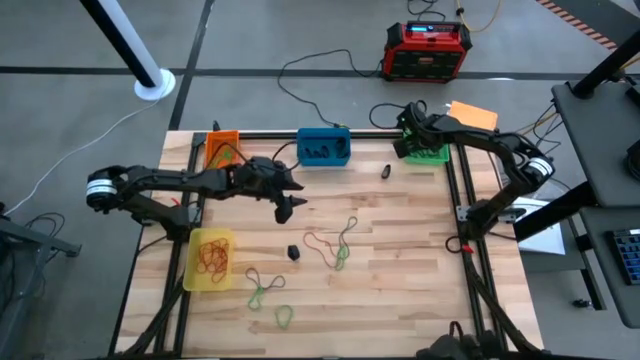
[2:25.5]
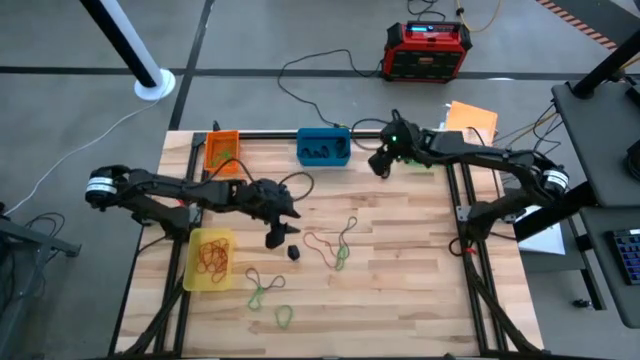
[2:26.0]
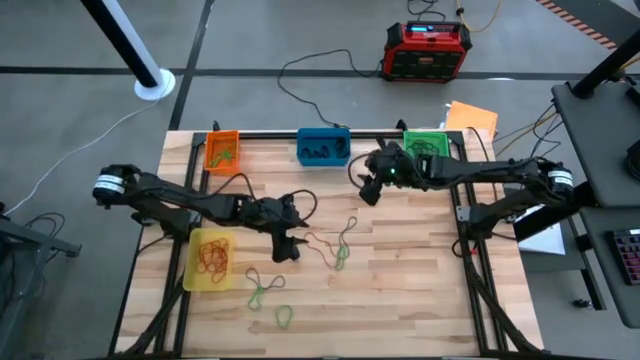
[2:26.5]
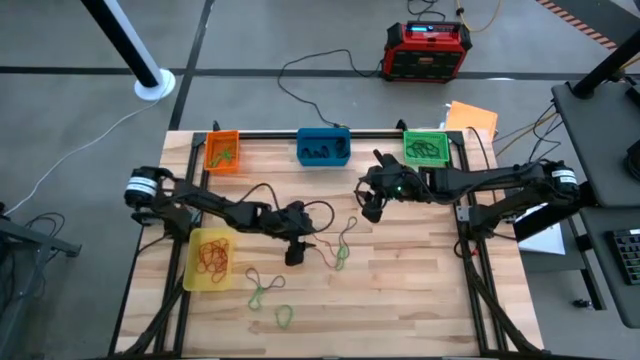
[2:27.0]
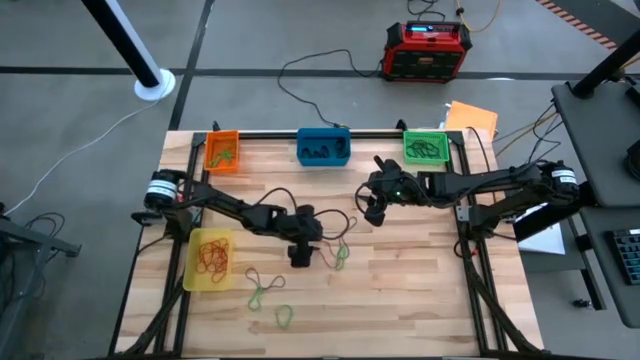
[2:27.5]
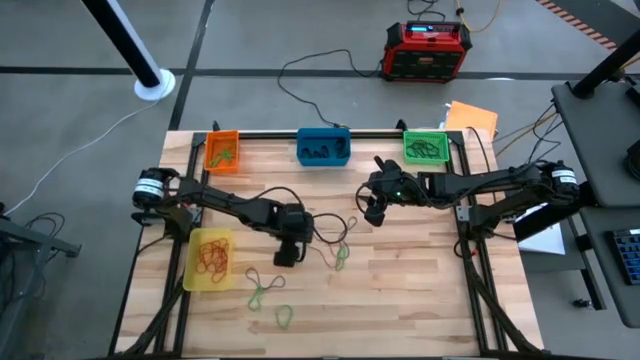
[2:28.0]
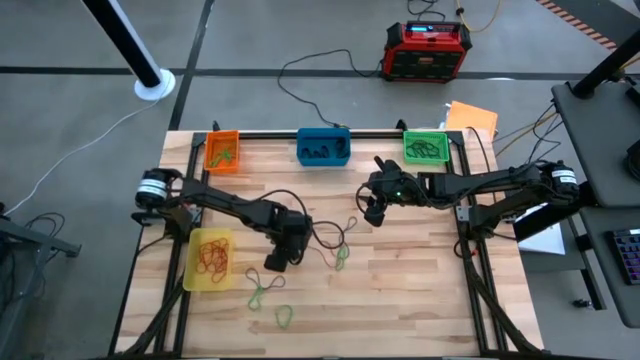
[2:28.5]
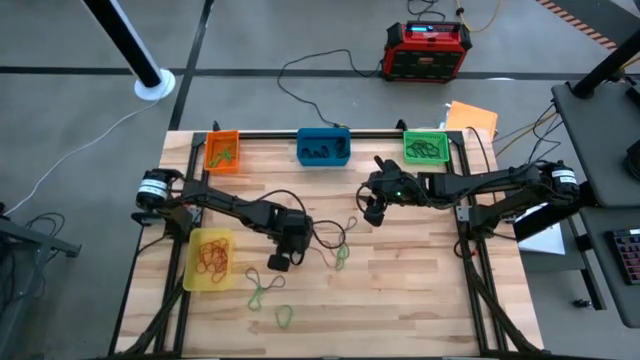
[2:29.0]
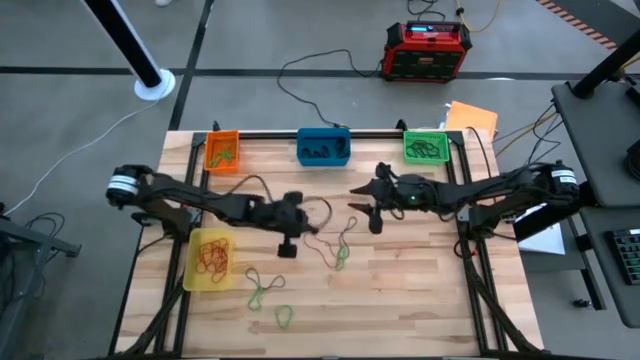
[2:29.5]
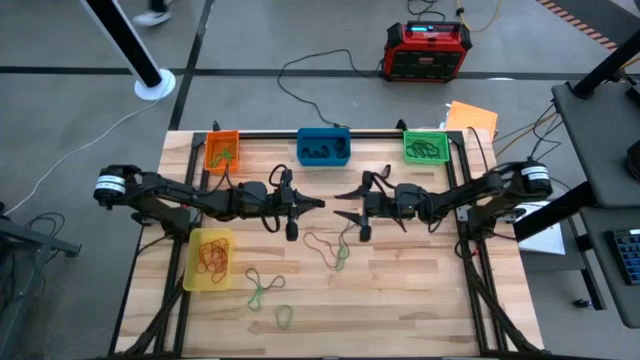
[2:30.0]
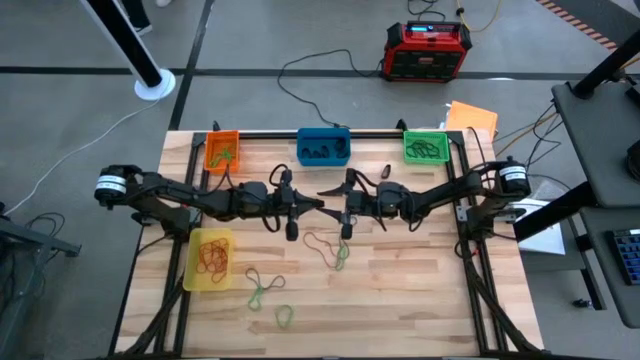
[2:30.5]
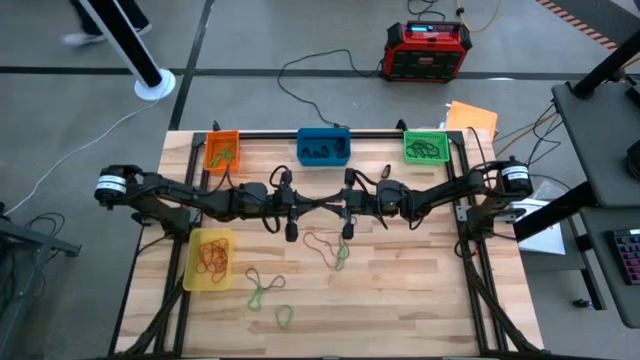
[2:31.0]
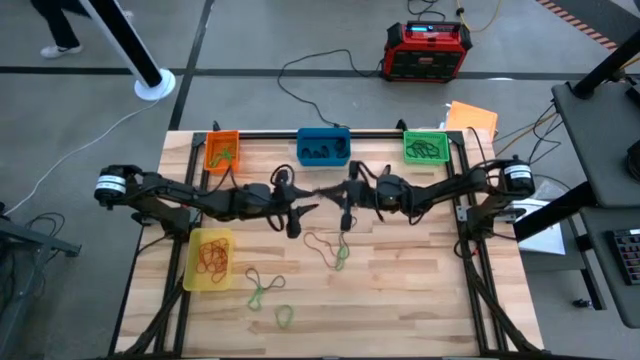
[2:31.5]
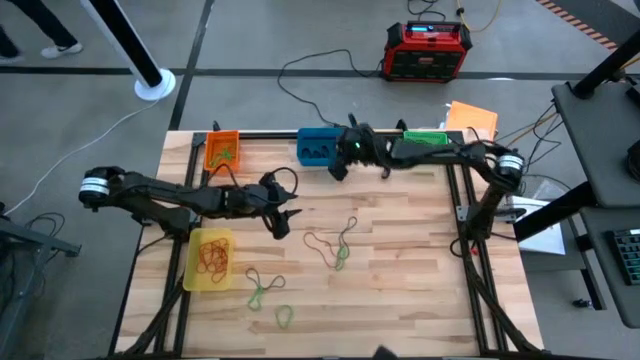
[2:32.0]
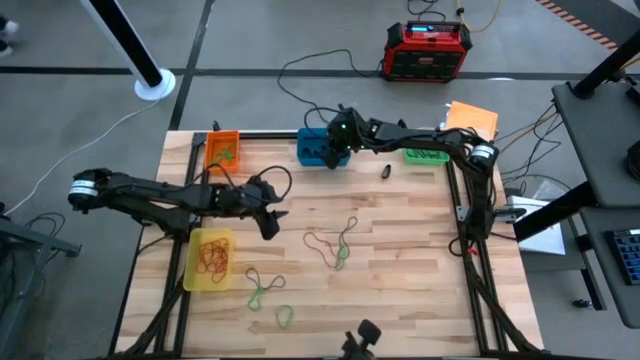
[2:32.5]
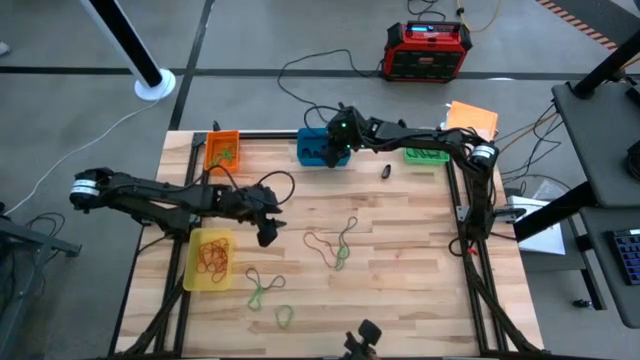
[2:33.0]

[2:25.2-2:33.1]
Task: Sort rubber bands into baskets
Put the bottom black rubber band into the blue bin

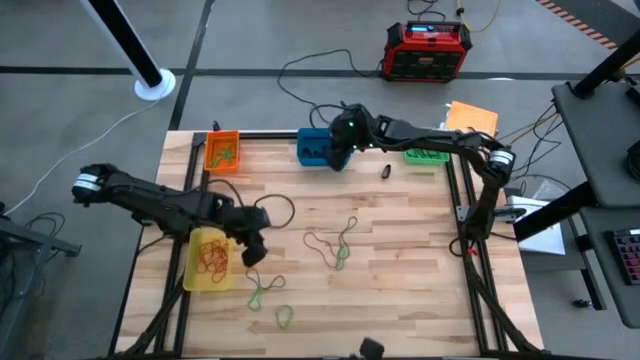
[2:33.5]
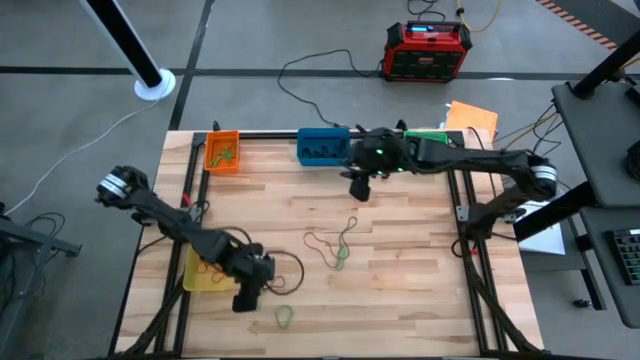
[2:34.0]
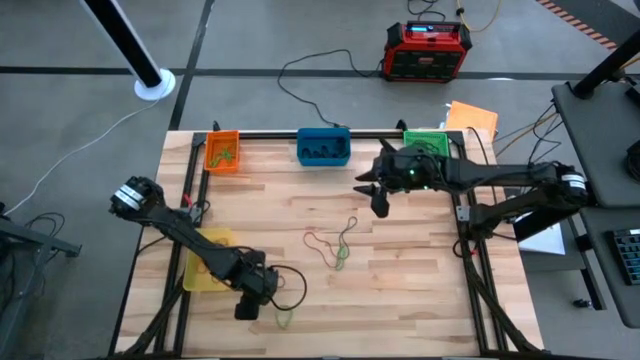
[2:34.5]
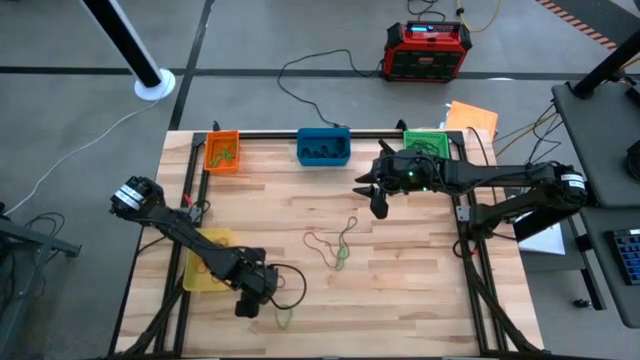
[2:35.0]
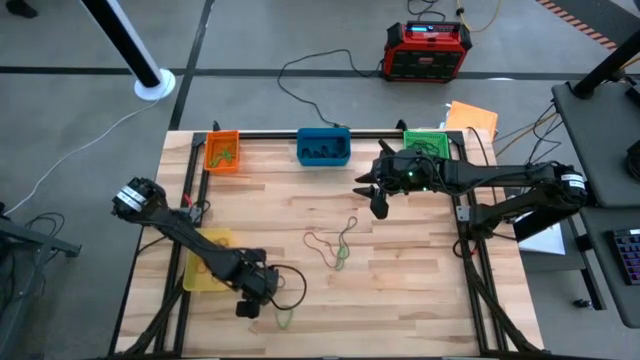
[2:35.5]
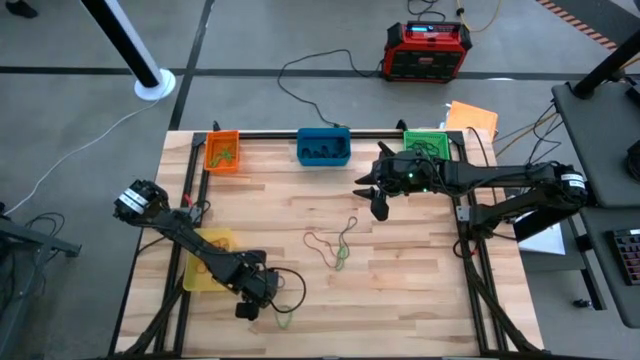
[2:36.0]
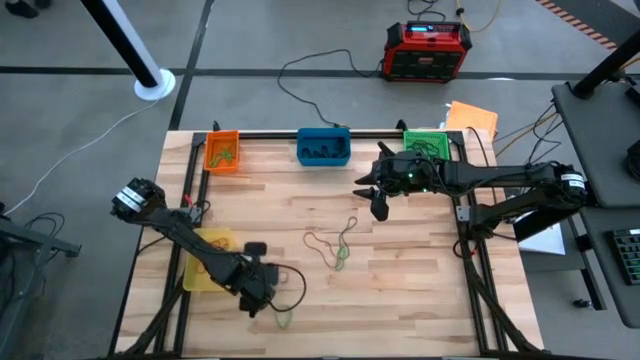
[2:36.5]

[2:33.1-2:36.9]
Put the top left green rubber band into the orange bin

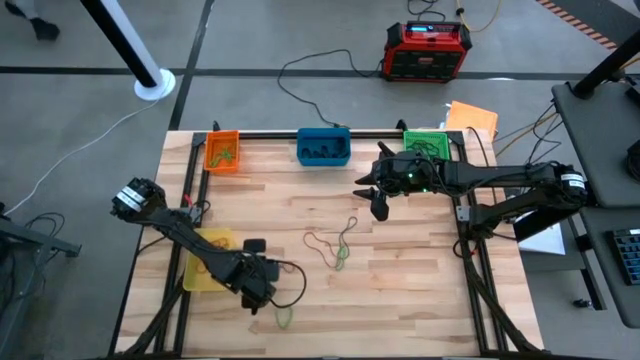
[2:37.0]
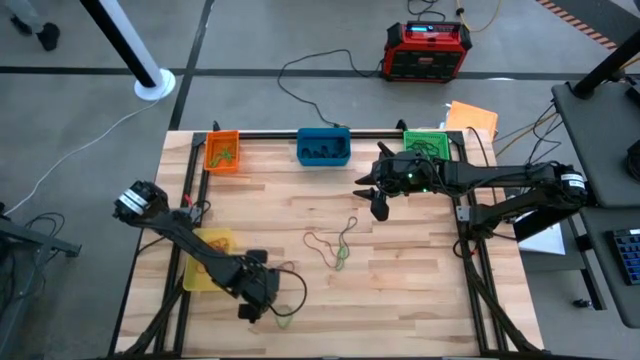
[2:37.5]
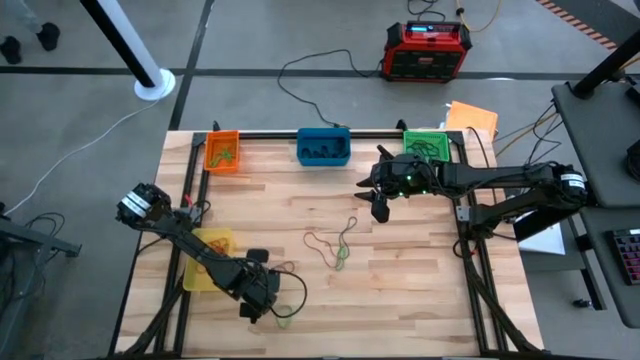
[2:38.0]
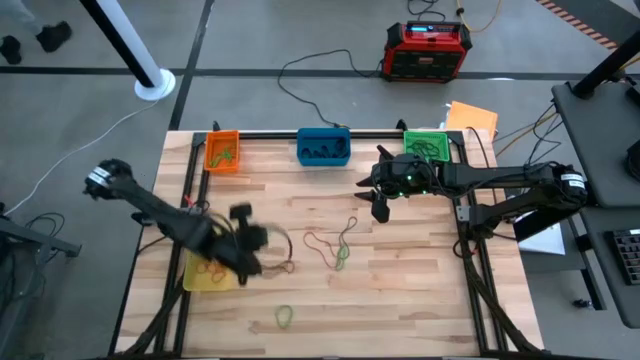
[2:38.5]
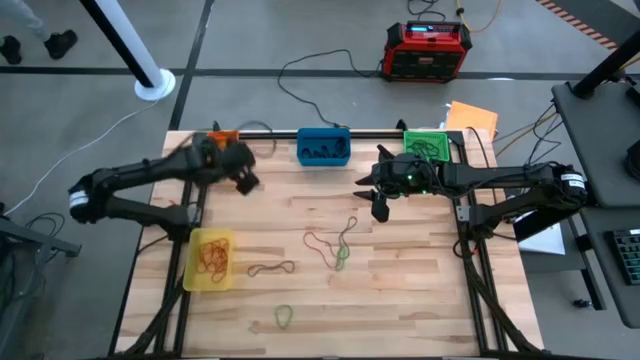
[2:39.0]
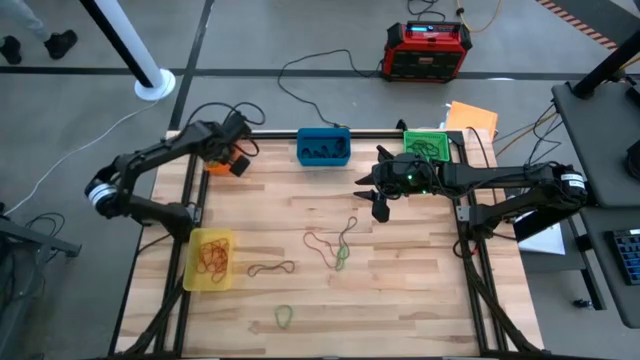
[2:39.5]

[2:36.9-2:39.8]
Put the top left green rubber band into the orange bin

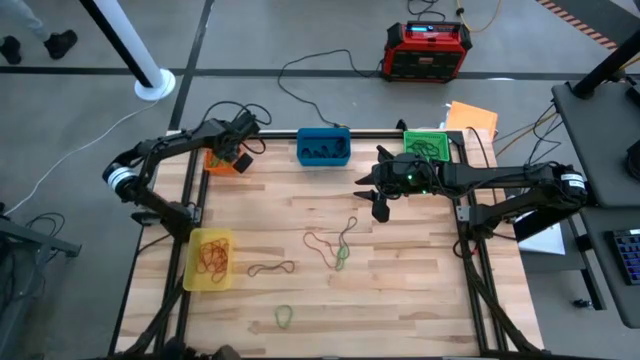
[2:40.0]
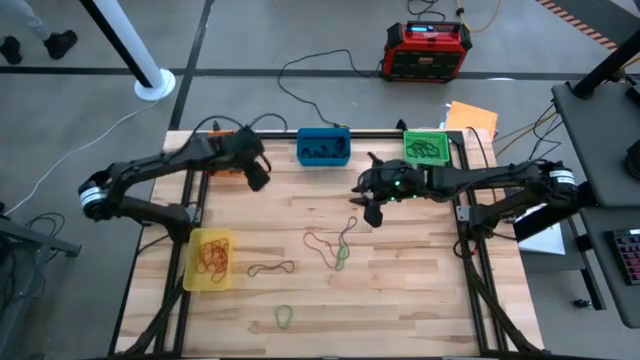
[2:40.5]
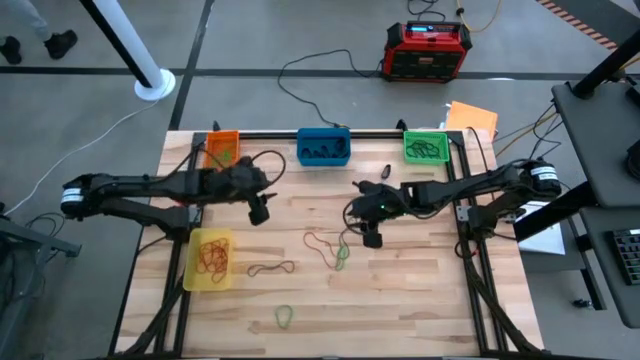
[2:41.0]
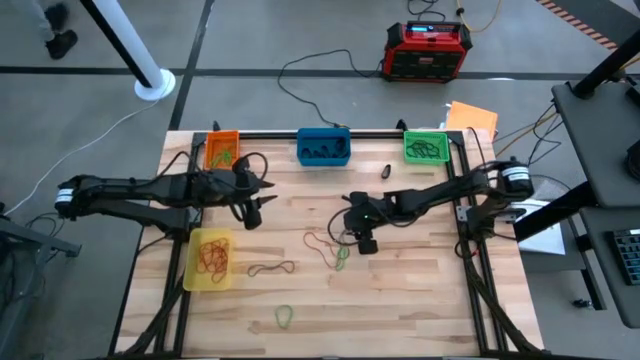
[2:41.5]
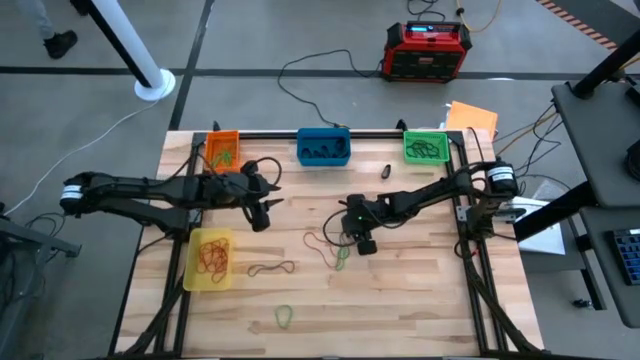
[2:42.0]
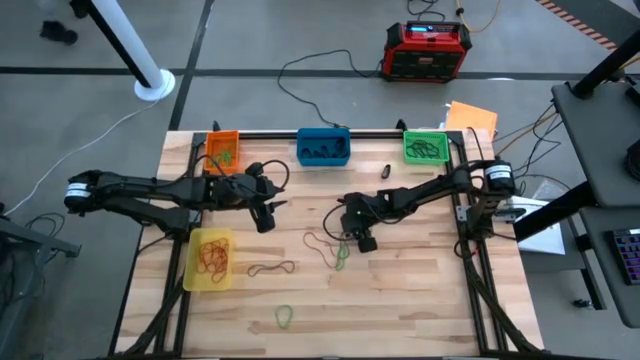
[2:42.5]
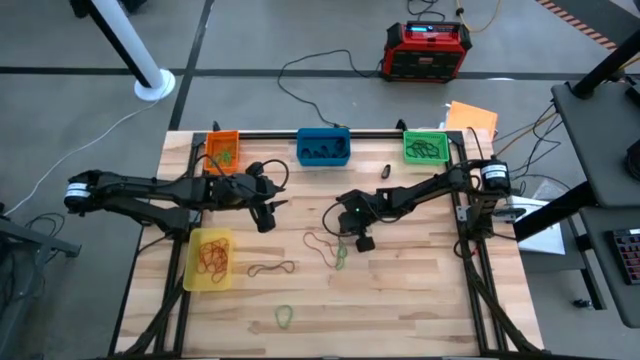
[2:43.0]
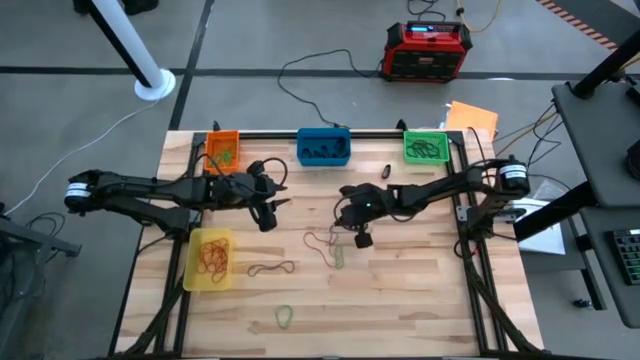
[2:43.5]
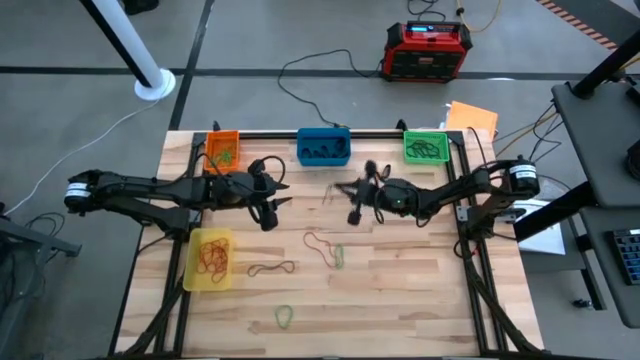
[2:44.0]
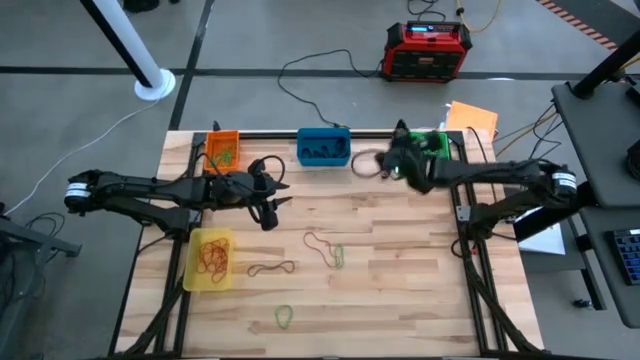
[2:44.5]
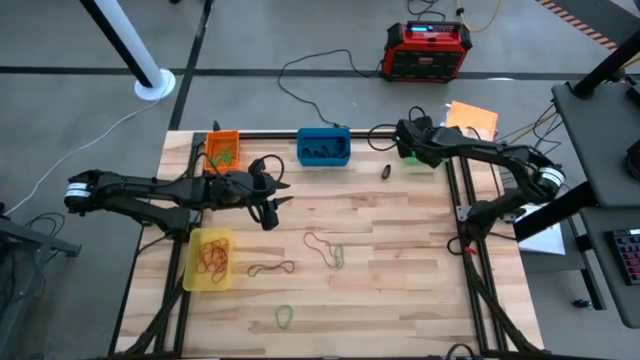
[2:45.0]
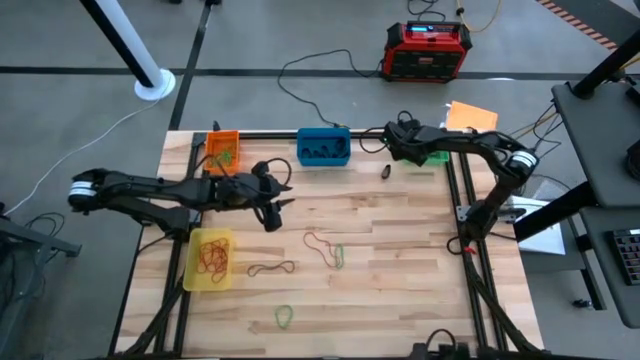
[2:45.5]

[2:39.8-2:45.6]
Put the right violet rubber band into the green bin

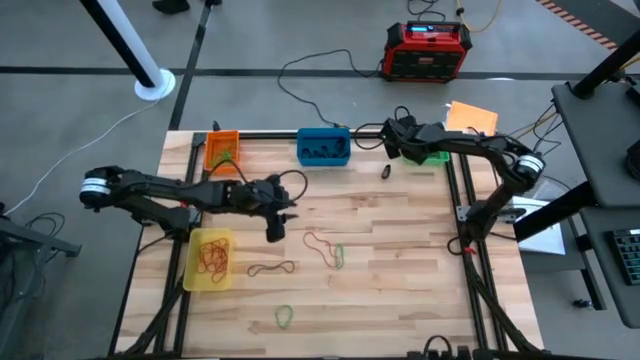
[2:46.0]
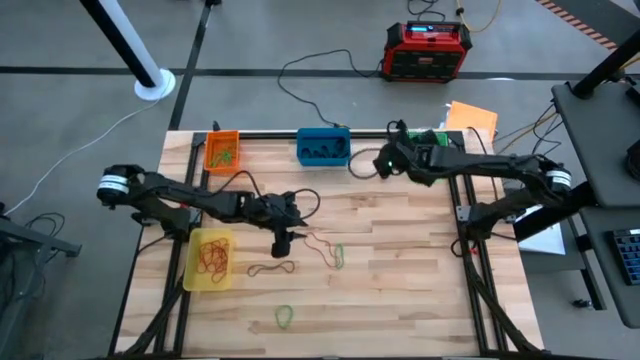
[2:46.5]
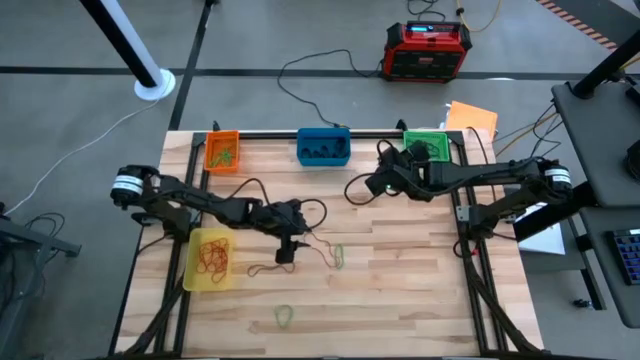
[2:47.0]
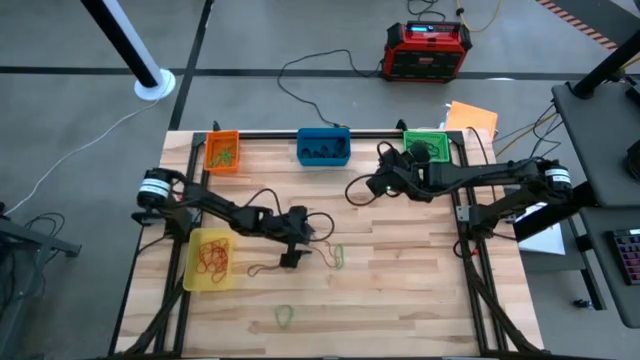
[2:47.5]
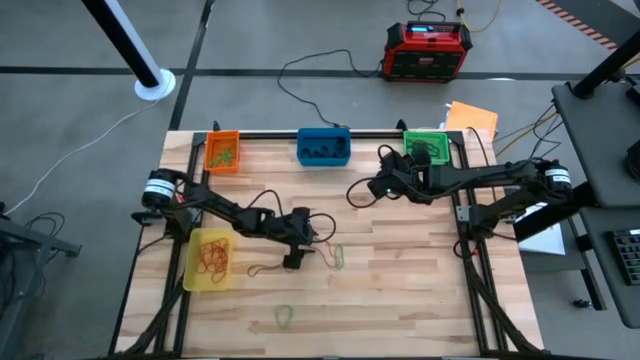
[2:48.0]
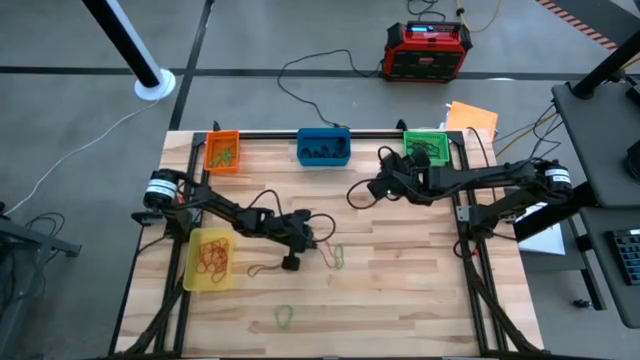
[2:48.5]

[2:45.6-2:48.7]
Put the red rubber band into the yellow bin
